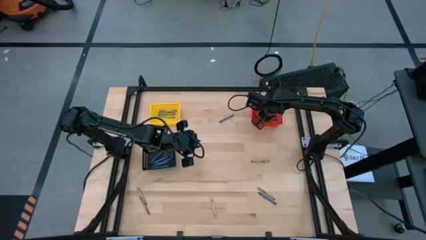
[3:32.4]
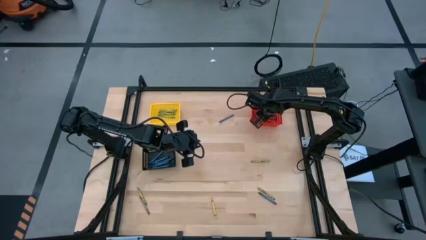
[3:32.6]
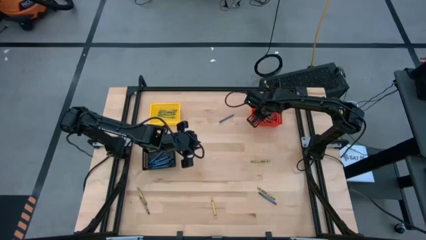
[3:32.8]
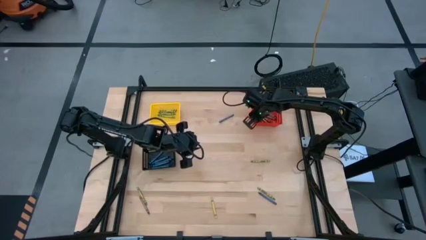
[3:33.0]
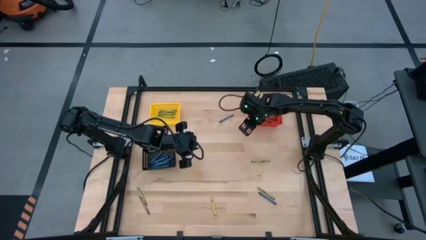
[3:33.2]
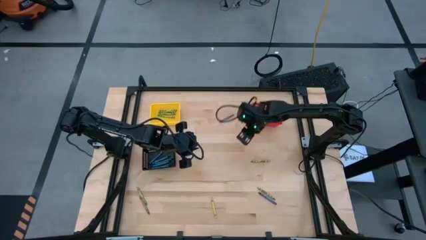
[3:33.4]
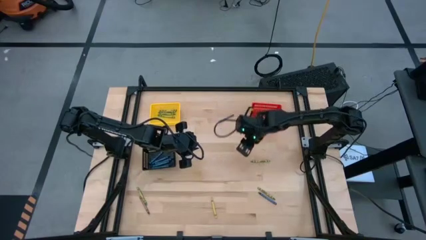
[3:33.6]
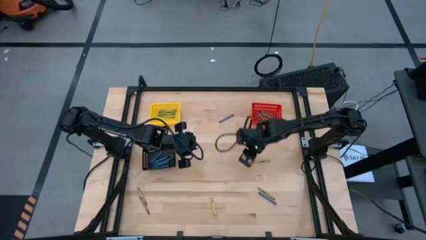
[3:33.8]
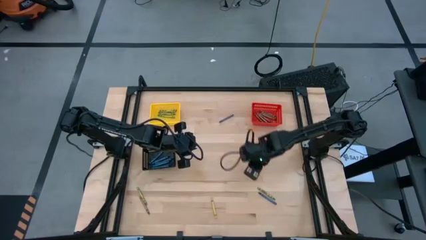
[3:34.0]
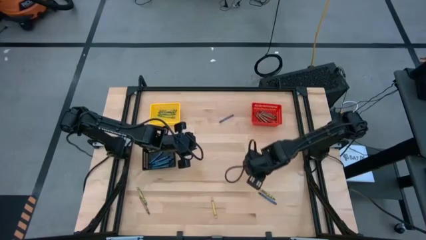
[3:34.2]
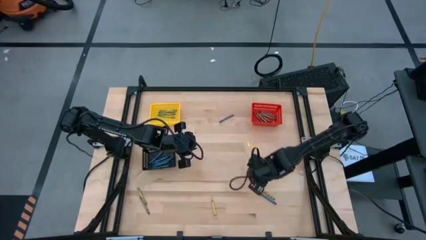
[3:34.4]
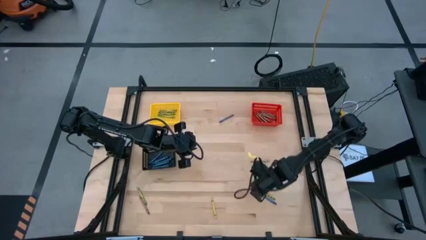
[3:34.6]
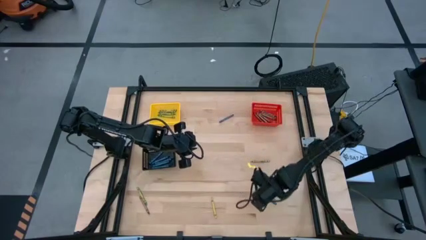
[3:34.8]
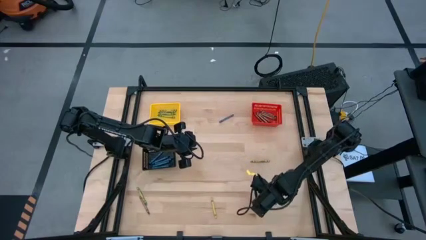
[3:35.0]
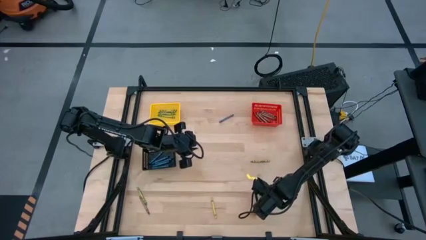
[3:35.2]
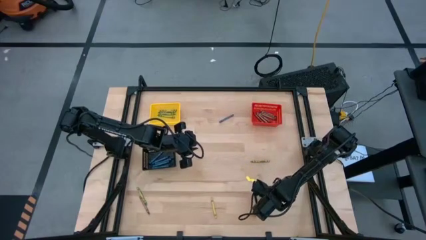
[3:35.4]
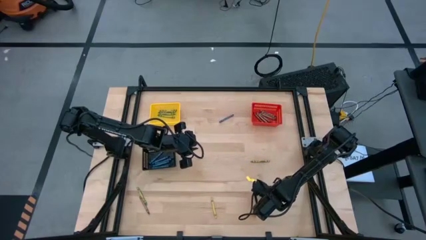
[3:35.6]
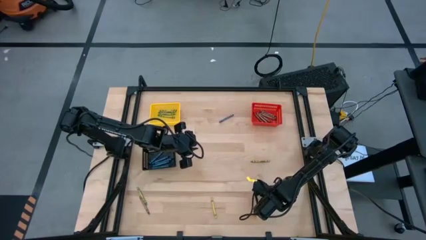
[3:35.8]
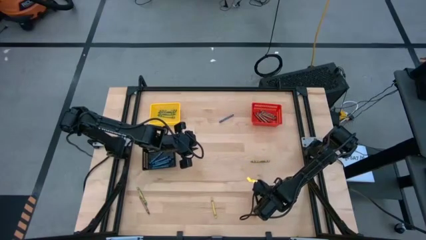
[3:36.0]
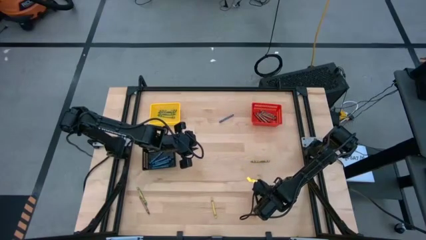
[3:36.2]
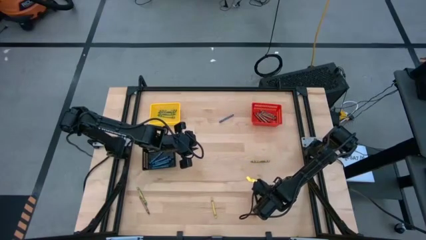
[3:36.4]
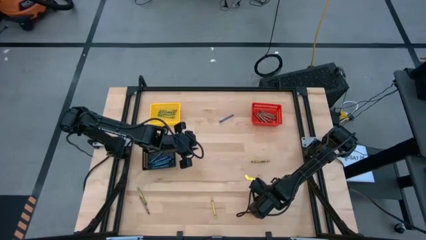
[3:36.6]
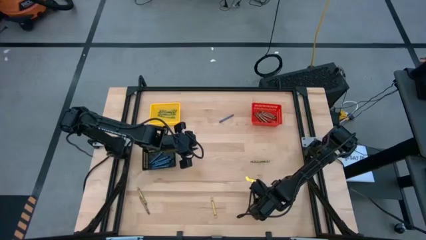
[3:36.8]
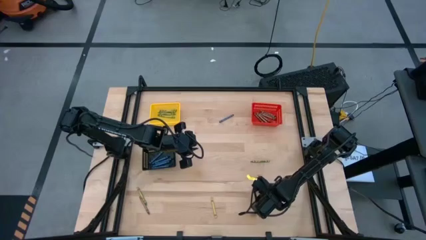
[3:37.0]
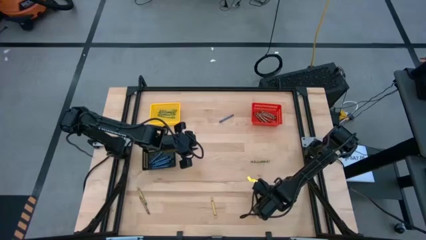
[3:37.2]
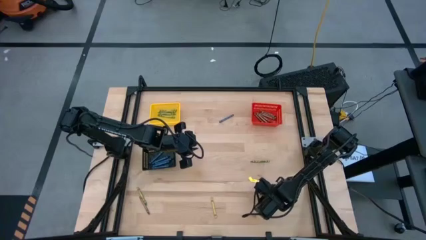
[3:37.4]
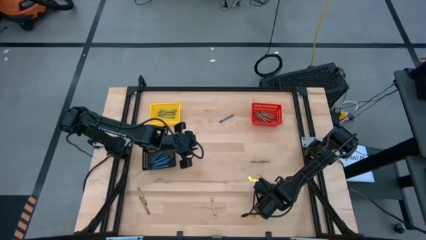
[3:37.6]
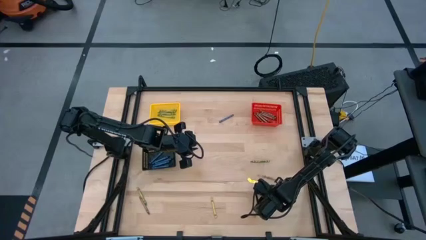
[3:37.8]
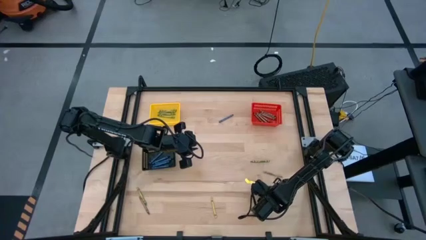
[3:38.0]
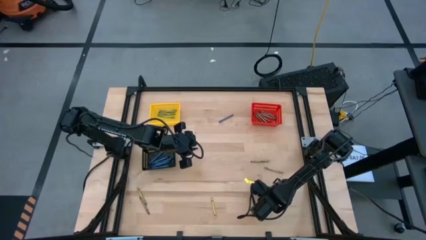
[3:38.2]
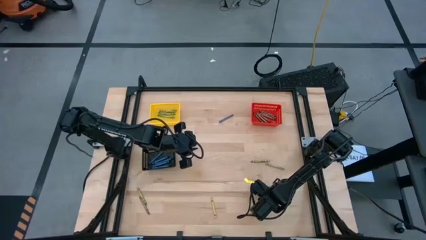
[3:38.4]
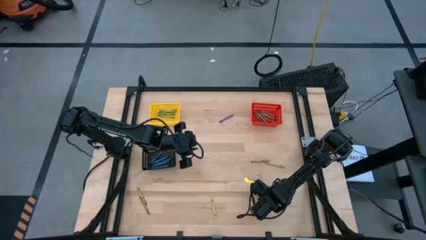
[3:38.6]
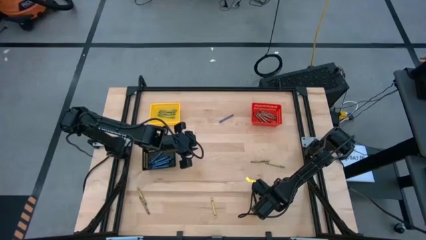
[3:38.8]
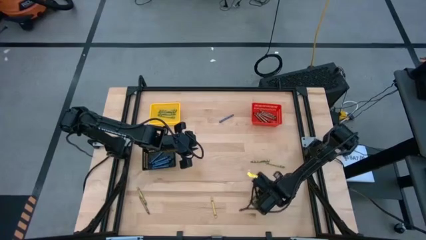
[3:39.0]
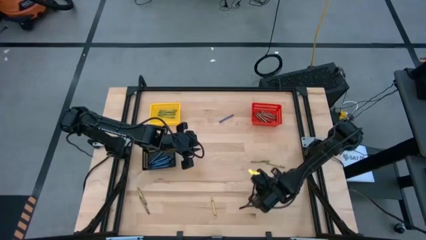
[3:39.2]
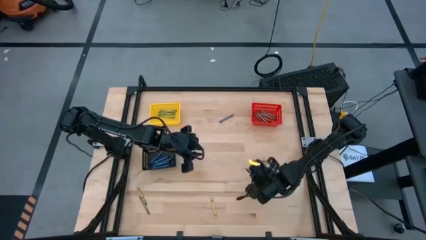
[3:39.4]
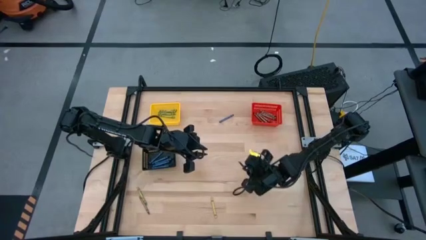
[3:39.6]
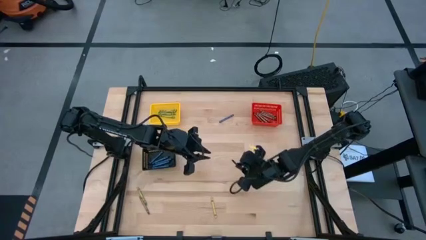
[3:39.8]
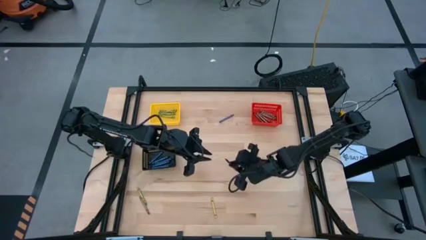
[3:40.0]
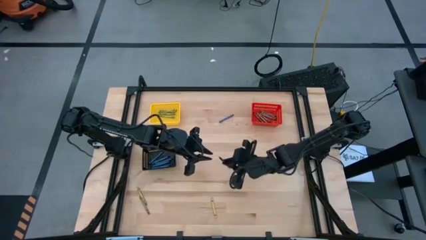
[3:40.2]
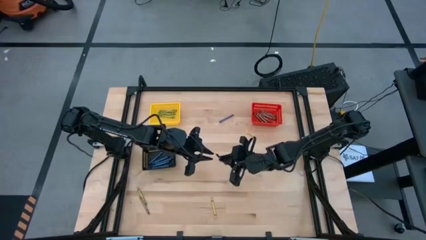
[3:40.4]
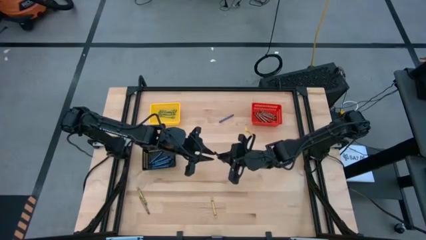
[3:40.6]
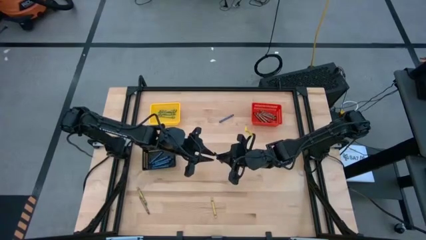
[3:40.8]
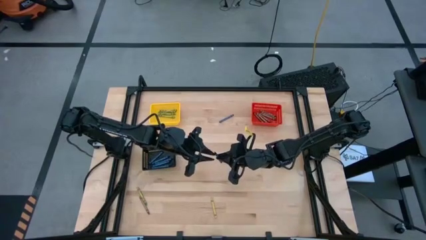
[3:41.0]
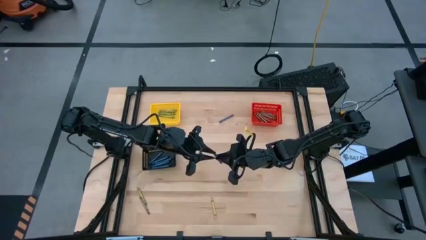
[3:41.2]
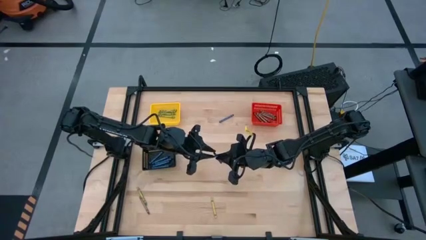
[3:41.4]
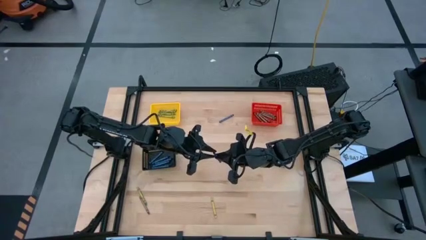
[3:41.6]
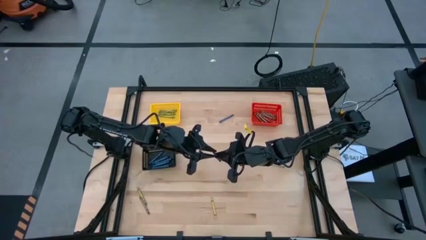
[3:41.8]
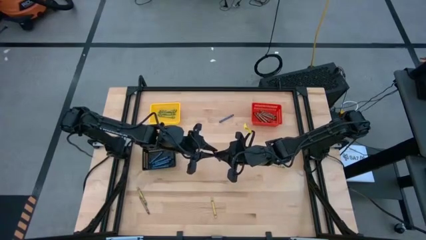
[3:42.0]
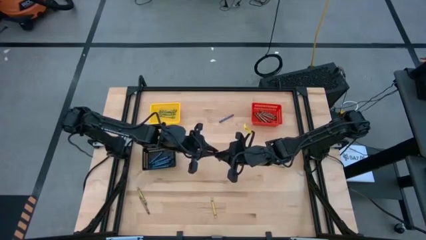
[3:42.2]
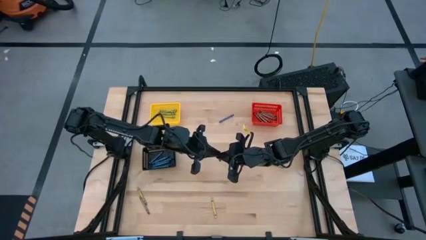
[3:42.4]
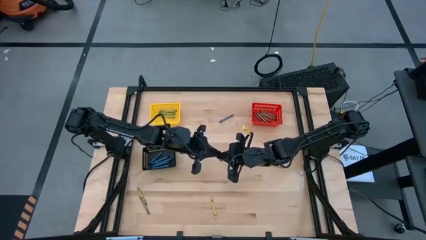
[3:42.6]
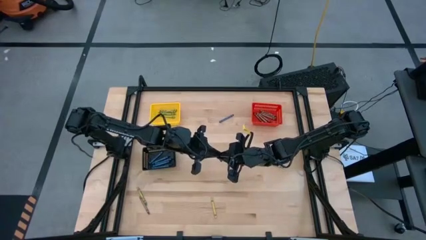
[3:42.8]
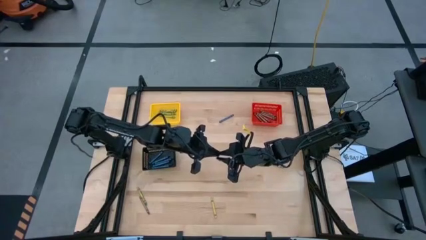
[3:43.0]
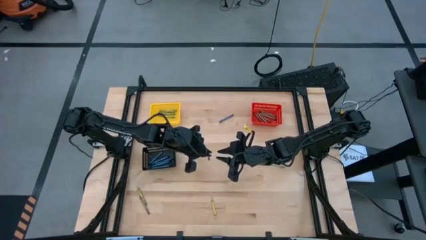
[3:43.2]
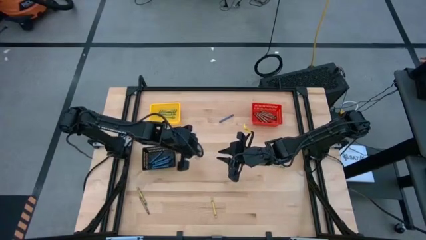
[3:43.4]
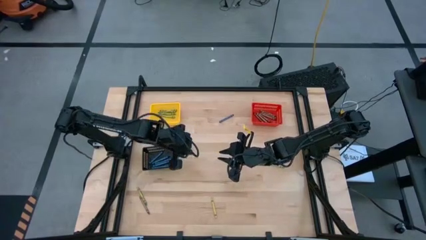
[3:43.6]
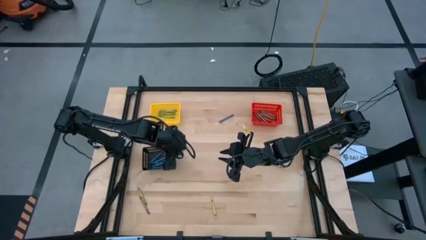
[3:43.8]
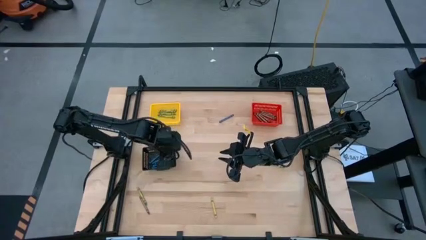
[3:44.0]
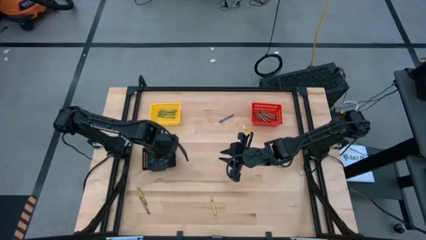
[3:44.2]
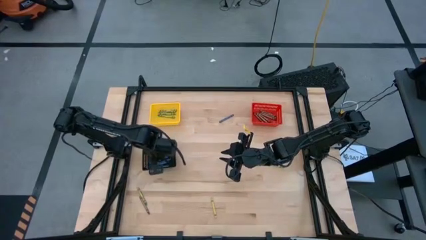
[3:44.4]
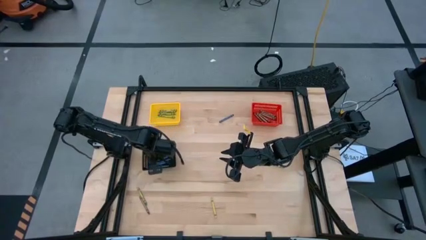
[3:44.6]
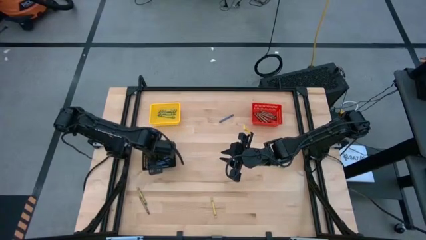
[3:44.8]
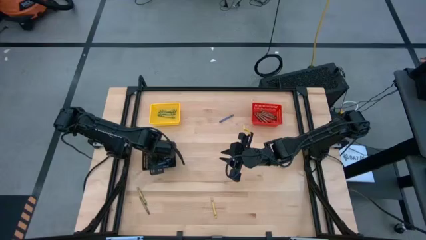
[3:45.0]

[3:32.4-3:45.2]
Task: Sort crayons
Put the blue crayon into the black bin

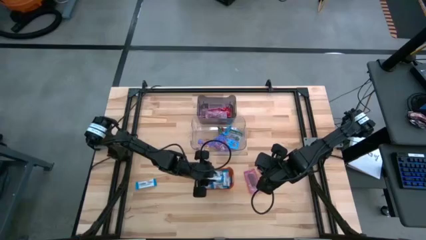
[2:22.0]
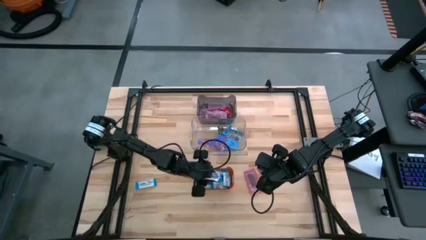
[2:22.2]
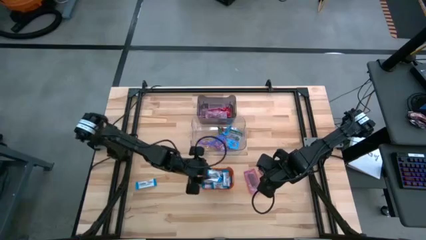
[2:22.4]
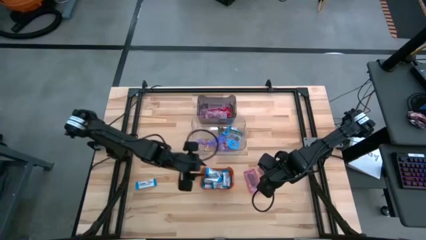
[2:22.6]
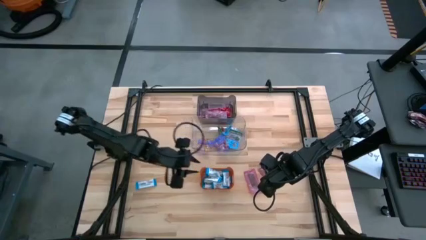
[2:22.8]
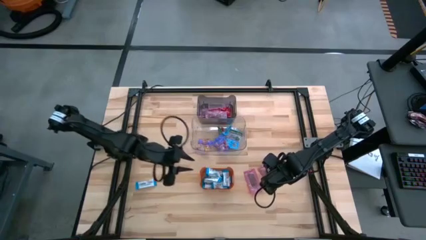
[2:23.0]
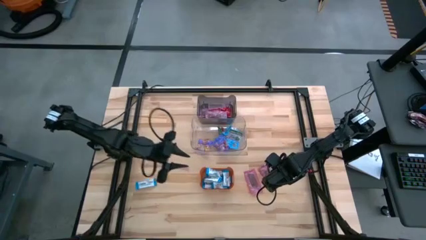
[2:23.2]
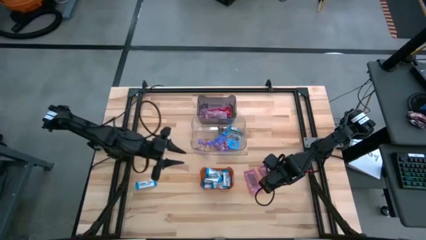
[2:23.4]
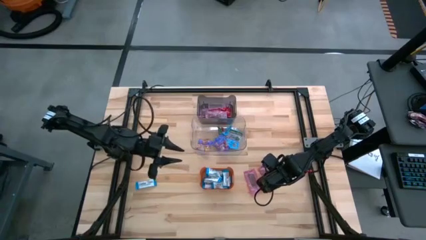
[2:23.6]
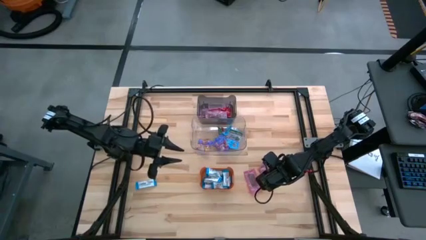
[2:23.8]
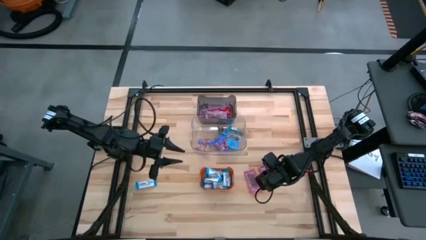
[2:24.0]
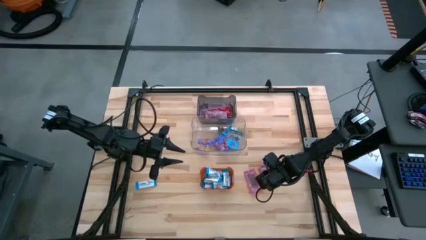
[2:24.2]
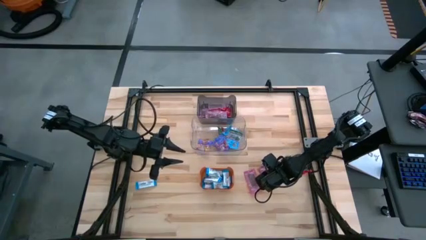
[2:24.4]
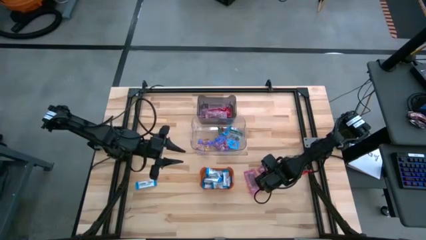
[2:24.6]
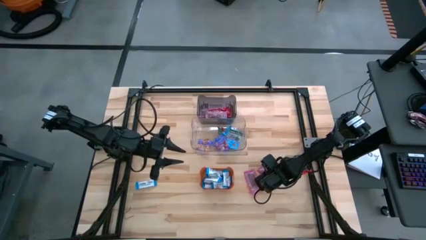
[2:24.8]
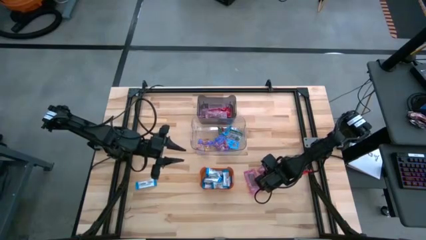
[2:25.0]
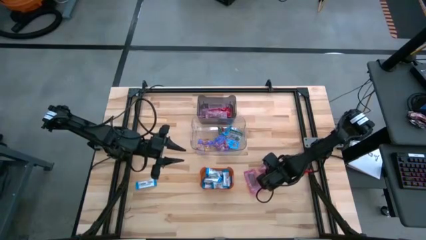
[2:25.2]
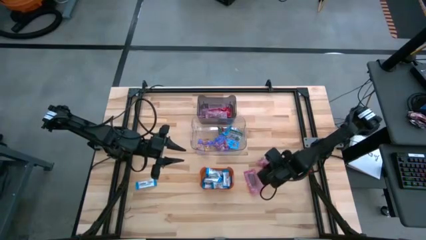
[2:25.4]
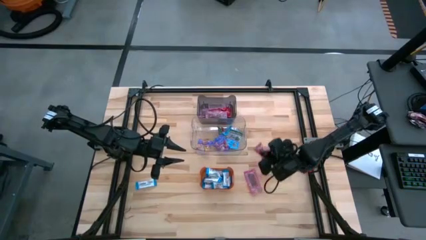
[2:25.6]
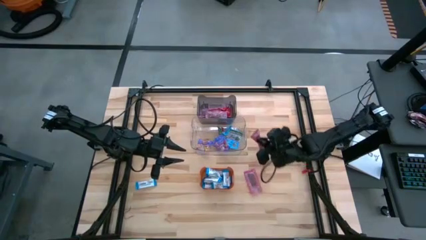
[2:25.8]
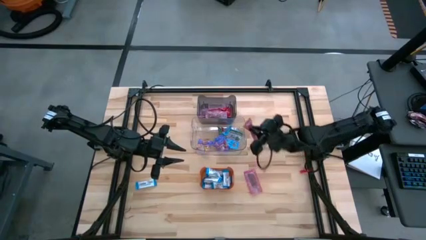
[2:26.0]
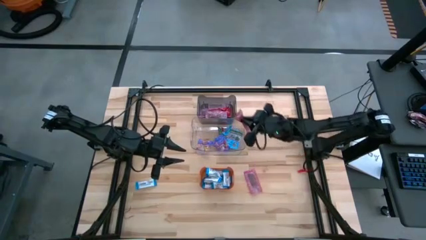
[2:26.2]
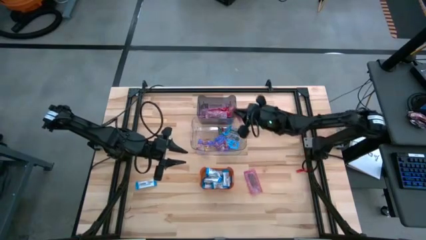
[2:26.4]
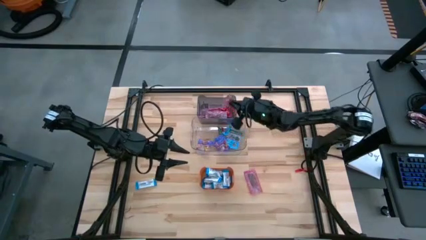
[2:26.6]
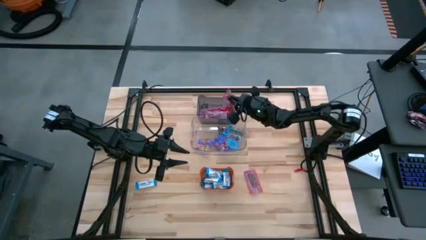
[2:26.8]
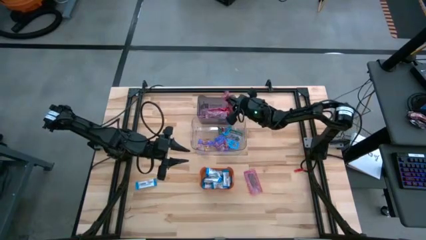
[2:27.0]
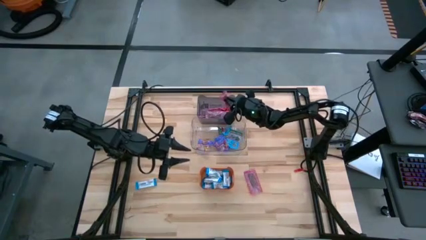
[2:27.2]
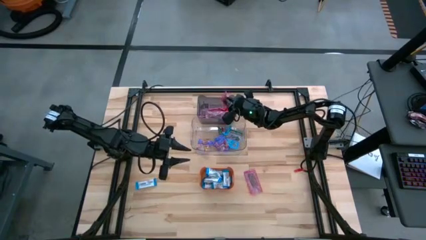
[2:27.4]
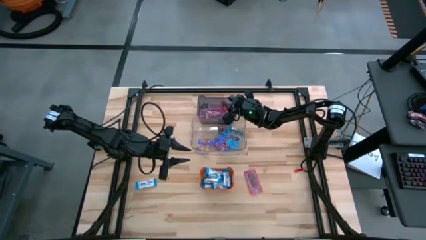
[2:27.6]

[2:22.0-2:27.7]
Task: Sort candy
Put the red candy into the dark gray bin
